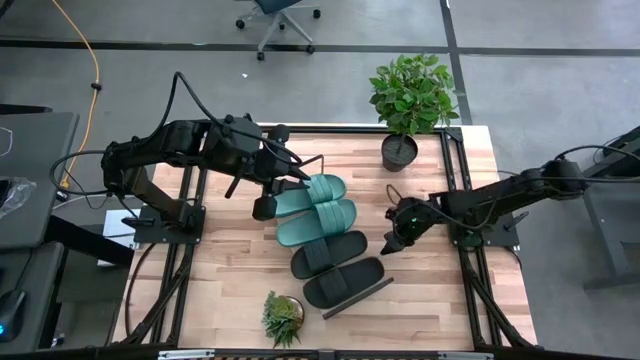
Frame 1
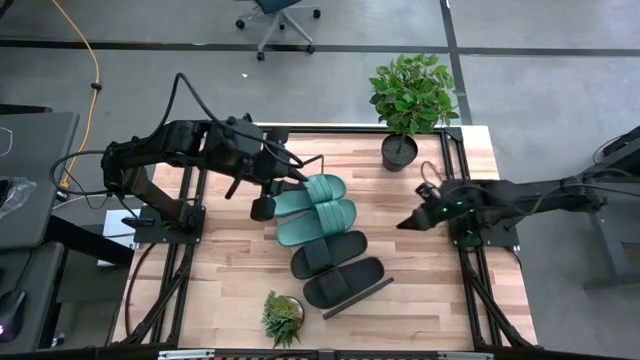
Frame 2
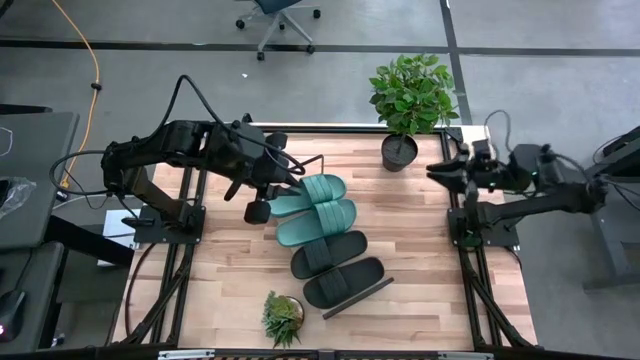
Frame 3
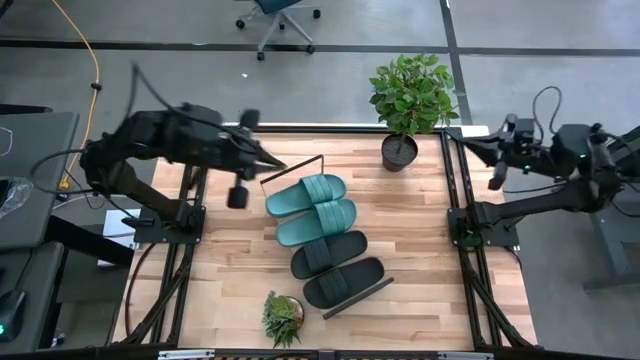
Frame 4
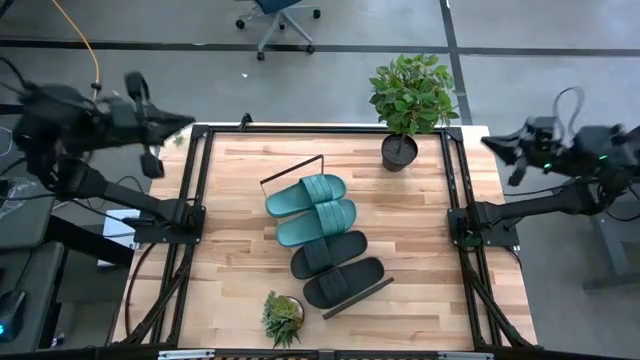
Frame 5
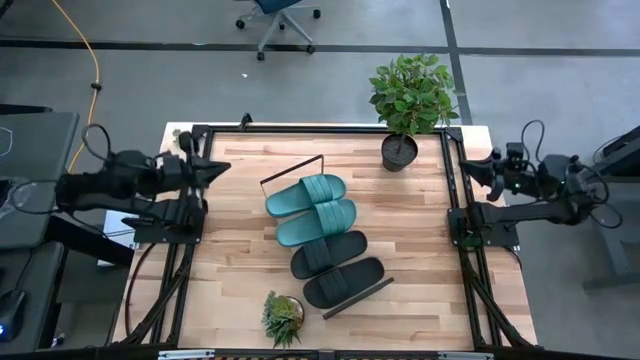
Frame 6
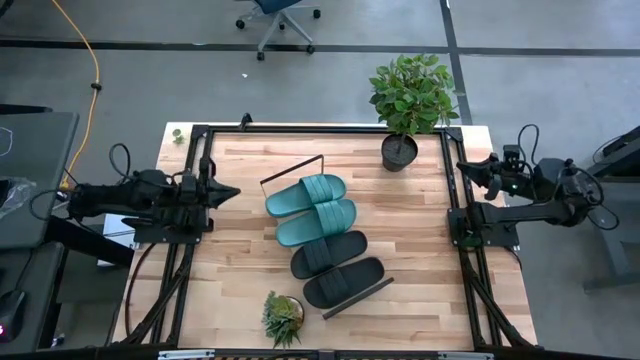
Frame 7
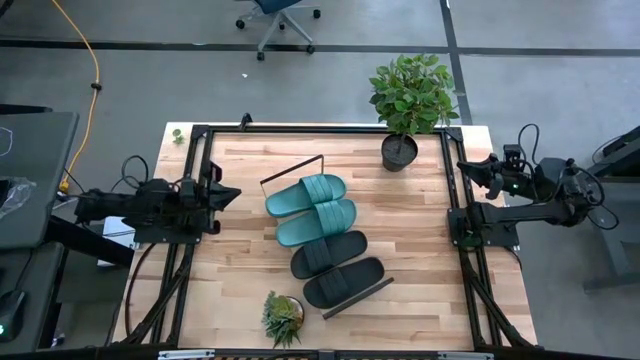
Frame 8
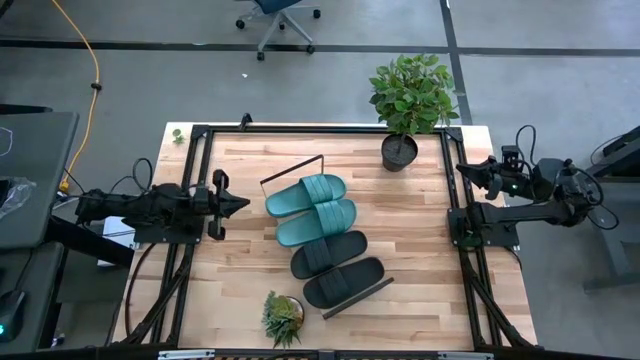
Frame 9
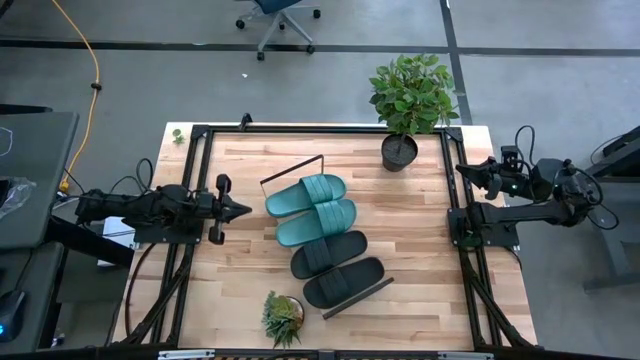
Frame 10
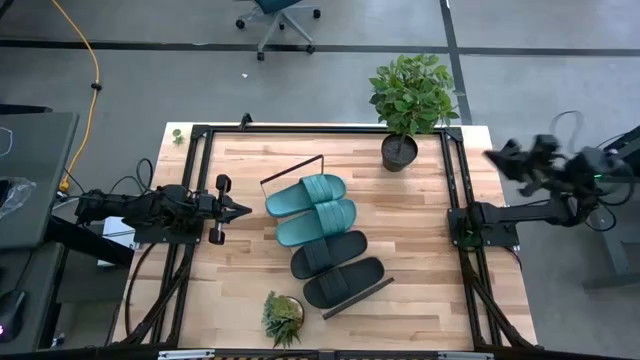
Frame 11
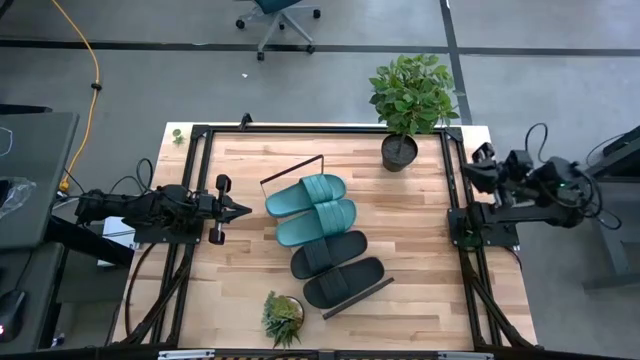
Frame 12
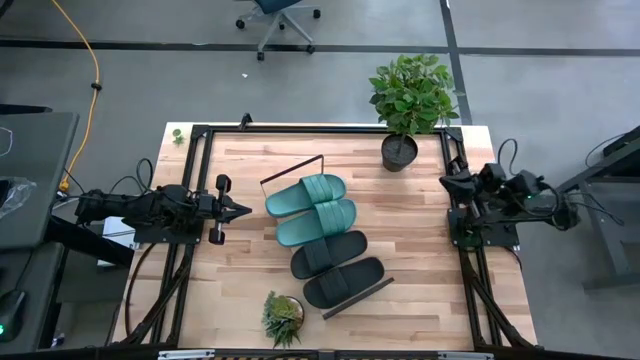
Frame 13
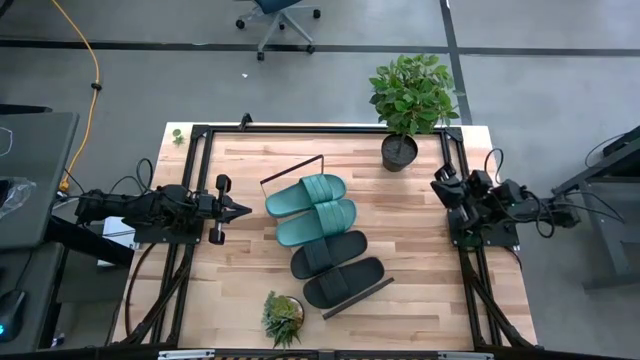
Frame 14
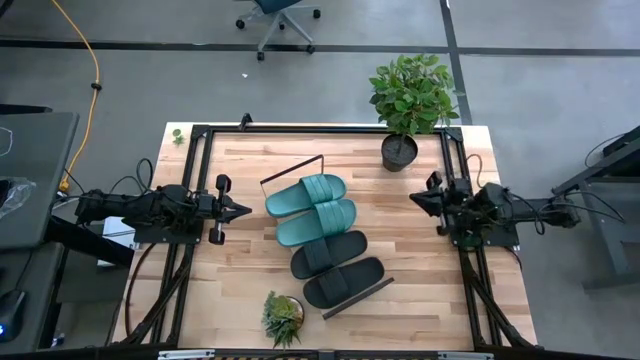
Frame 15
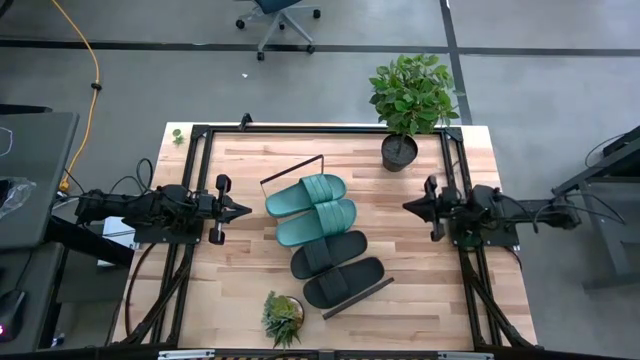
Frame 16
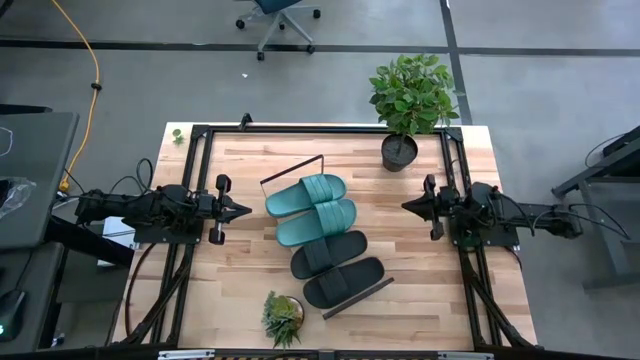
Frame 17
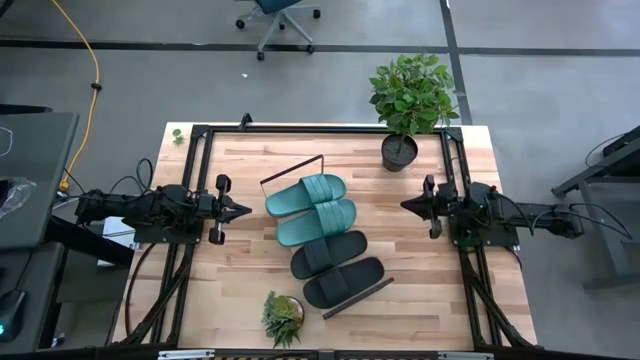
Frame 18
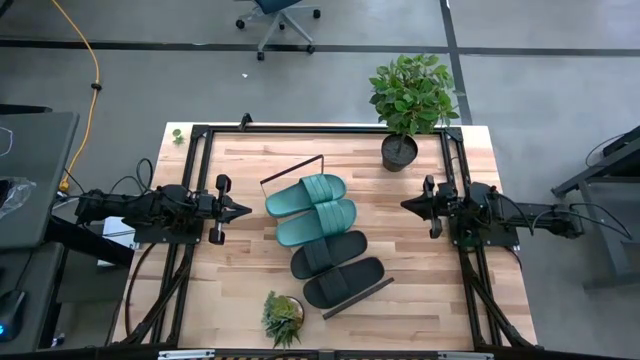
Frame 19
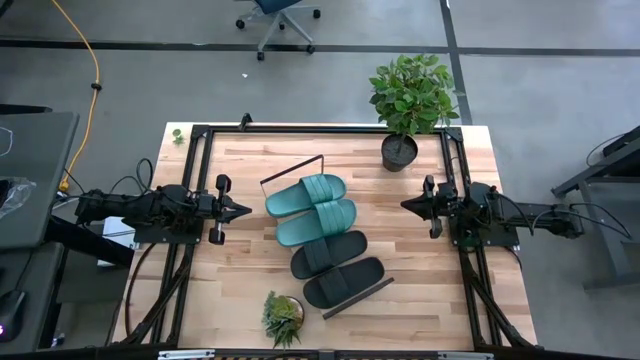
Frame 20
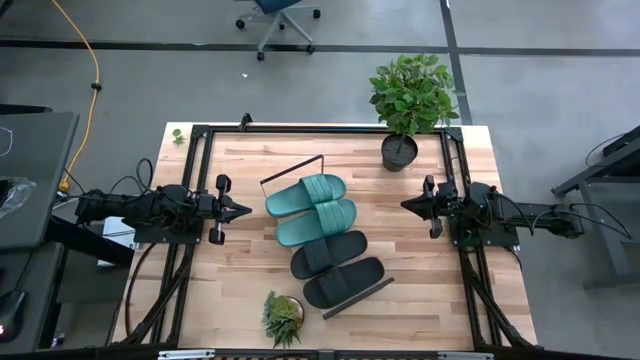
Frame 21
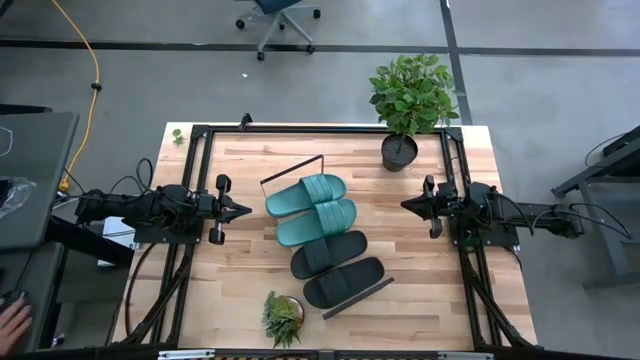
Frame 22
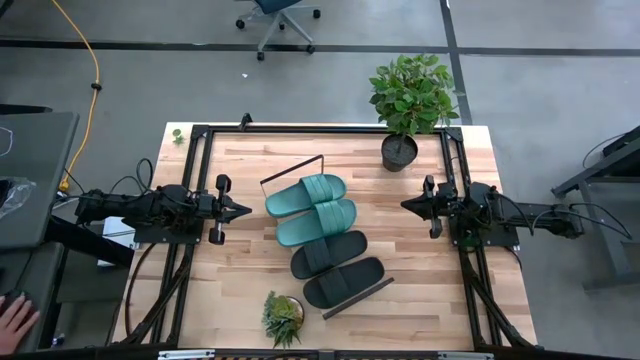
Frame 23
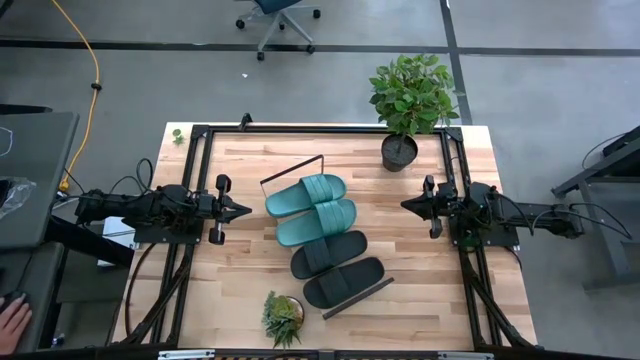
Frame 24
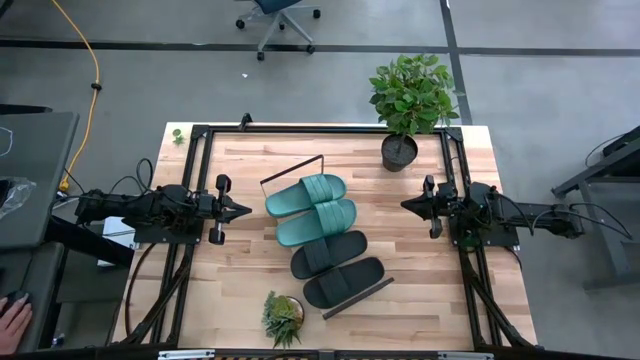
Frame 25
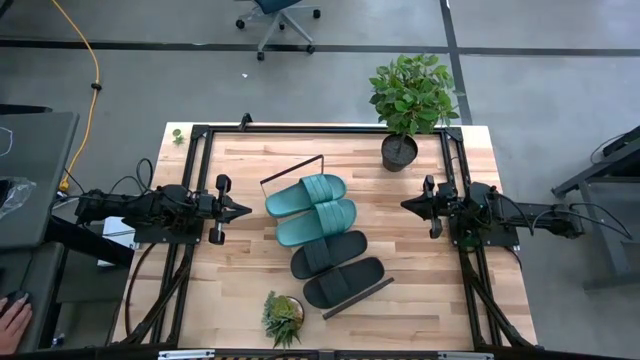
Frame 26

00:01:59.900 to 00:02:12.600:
Task: Pick and place slides into the shelf
Return to Home Position

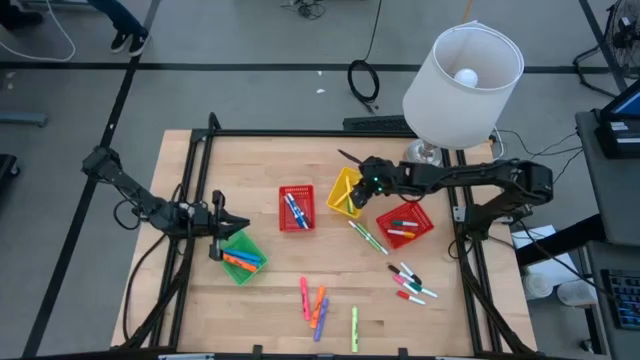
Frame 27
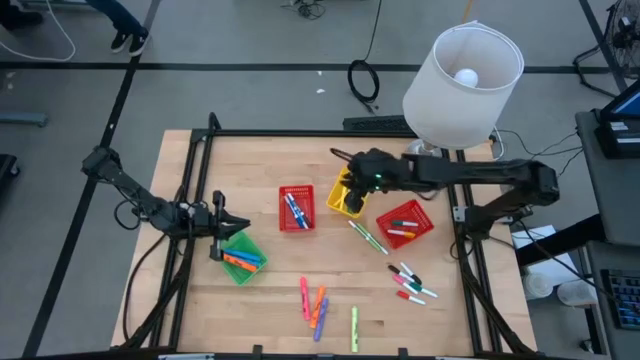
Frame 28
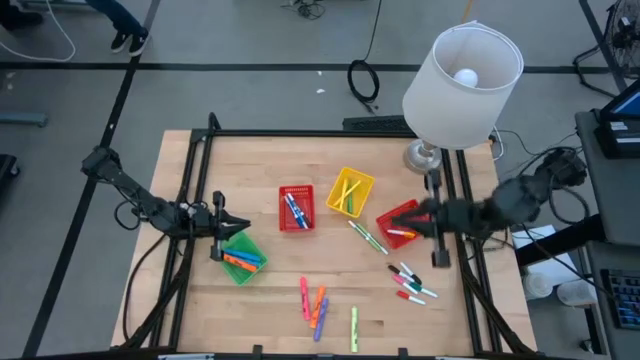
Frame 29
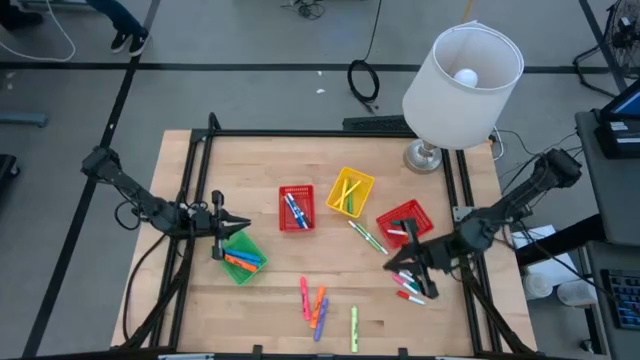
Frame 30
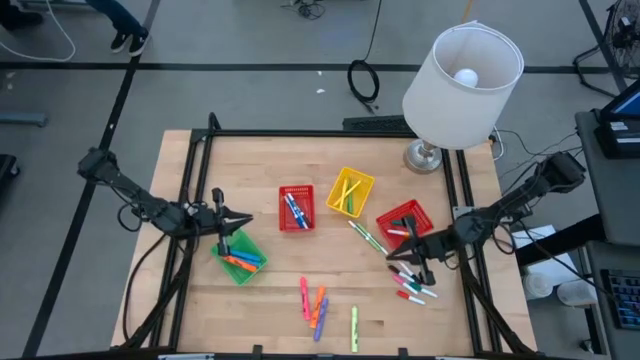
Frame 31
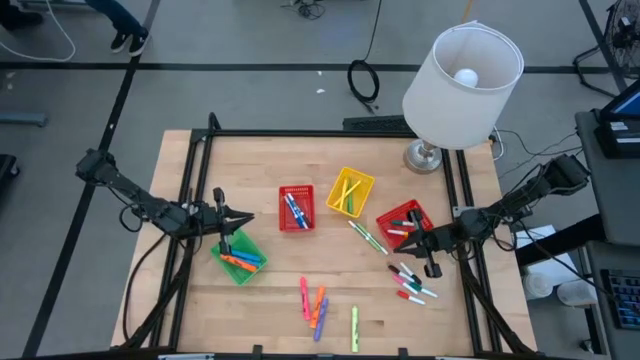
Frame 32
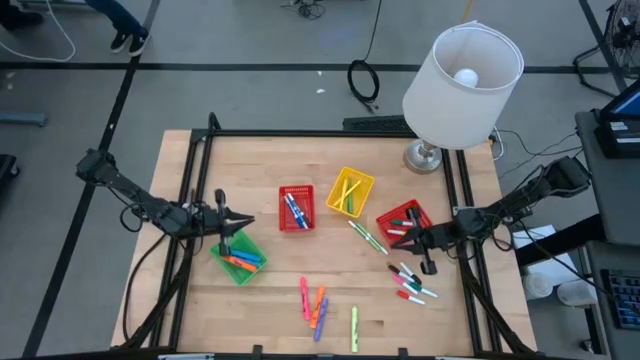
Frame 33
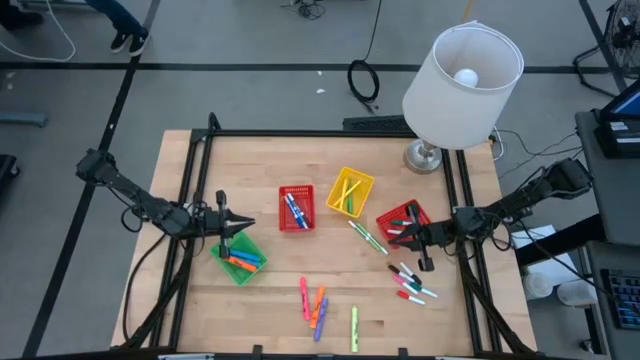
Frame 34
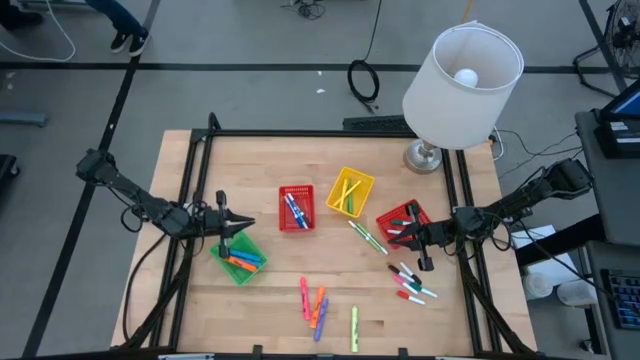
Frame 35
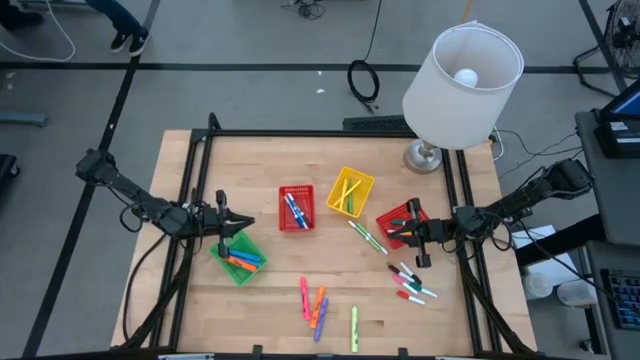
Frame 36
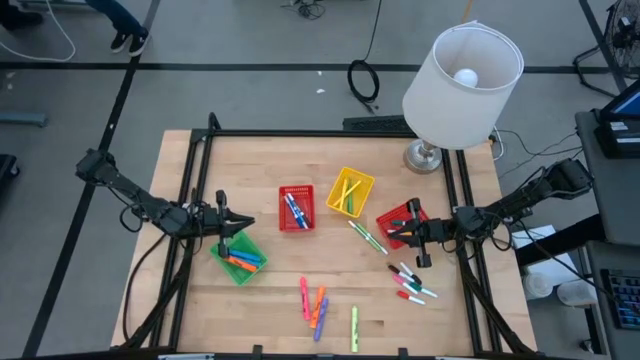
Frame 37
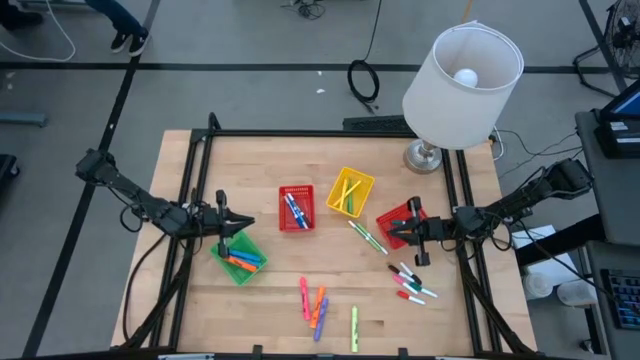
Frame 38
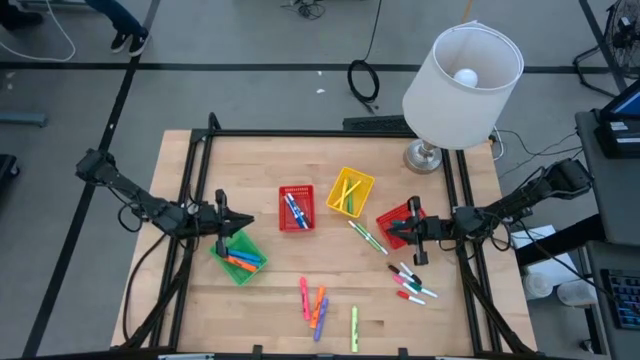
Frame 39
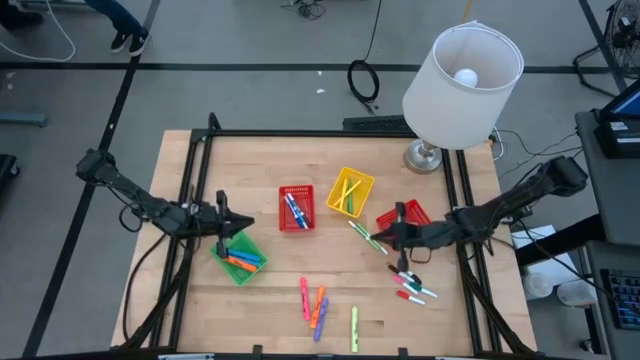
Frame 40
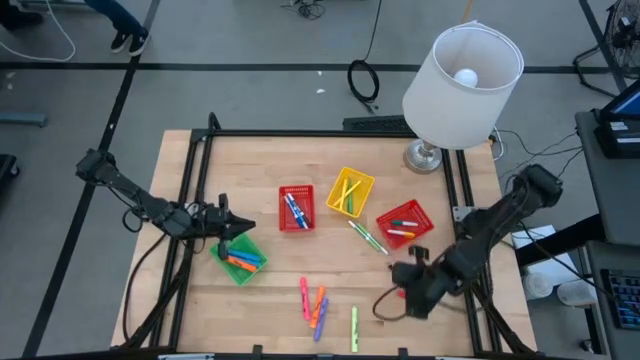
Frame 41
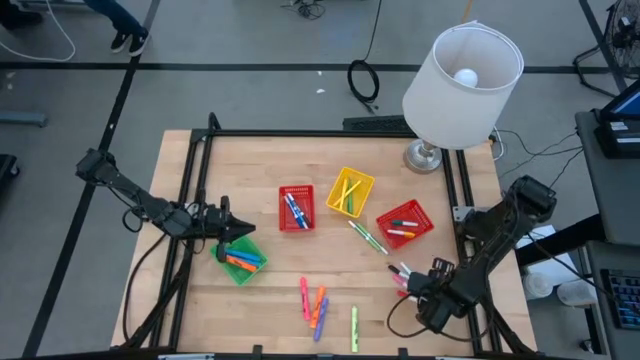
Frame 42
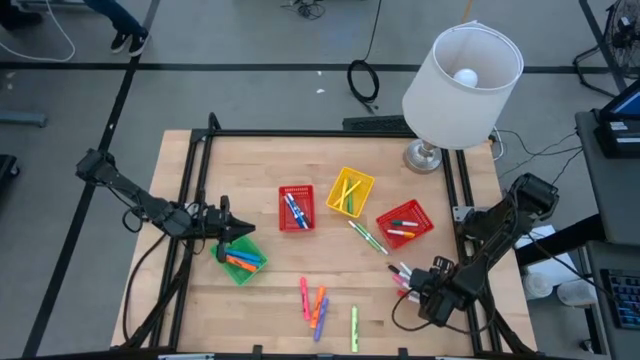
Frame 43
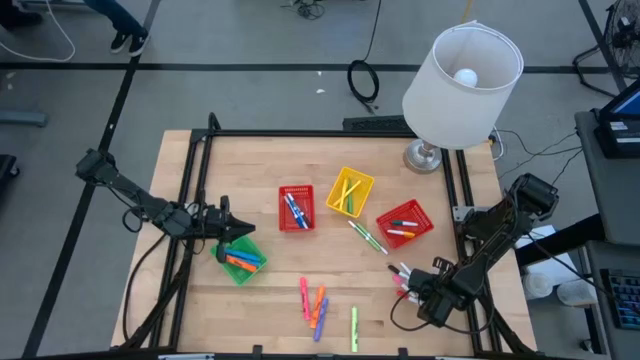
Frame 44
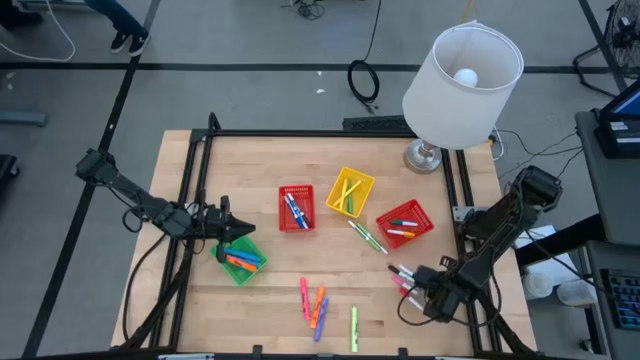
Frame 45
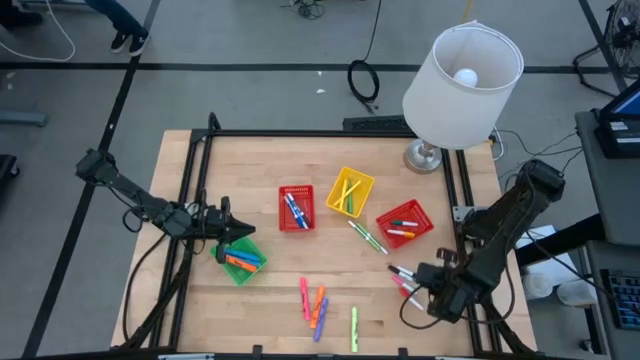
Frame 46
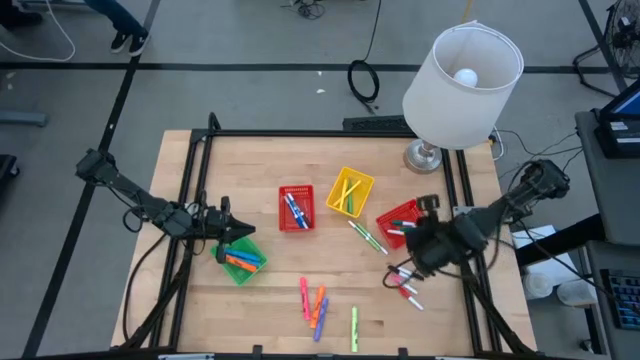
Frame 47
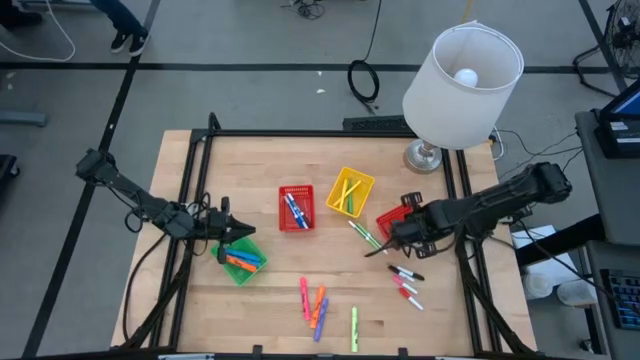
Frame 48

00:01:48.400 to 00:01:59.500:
Task: Pick & Place Markers
Put the small green highlighter pen into the right red bin
